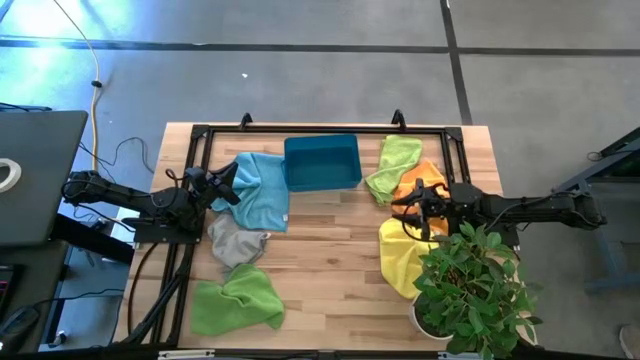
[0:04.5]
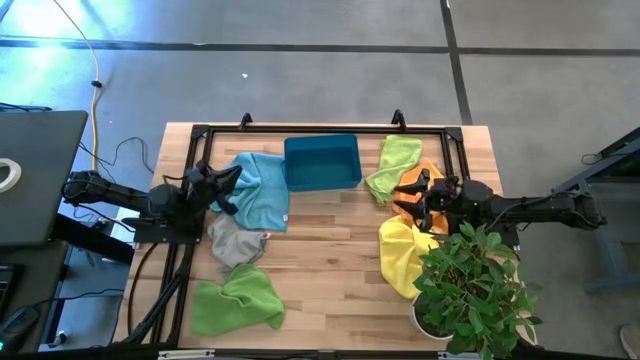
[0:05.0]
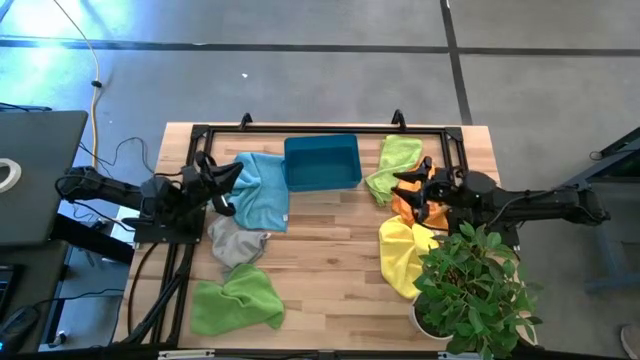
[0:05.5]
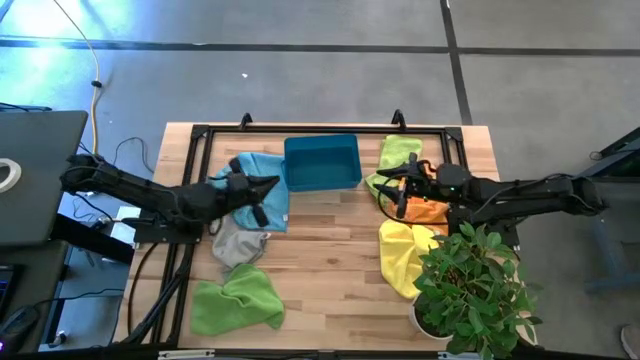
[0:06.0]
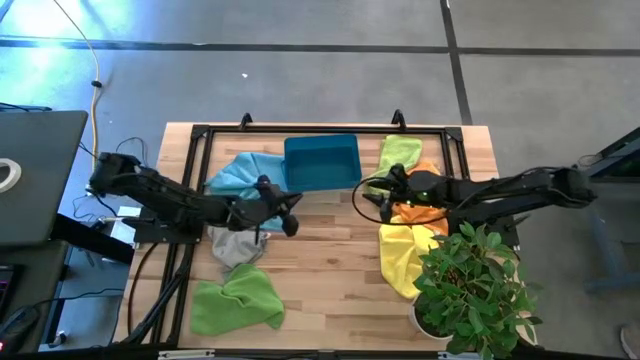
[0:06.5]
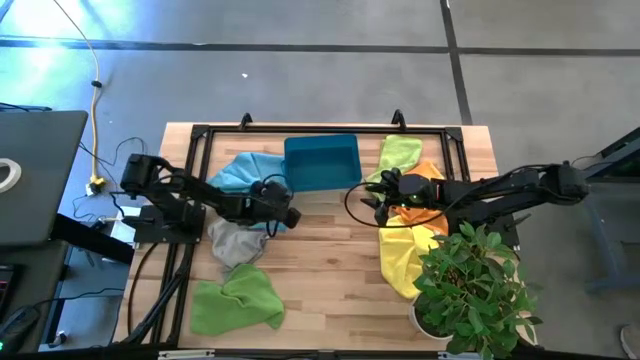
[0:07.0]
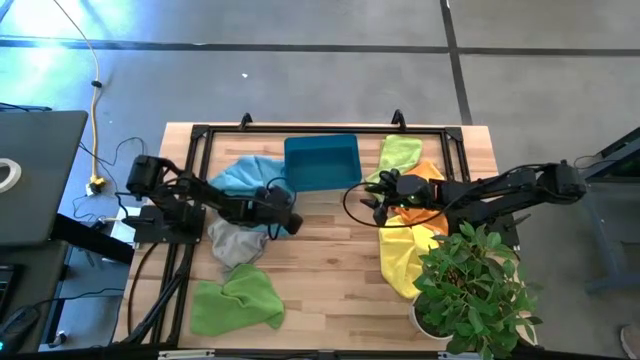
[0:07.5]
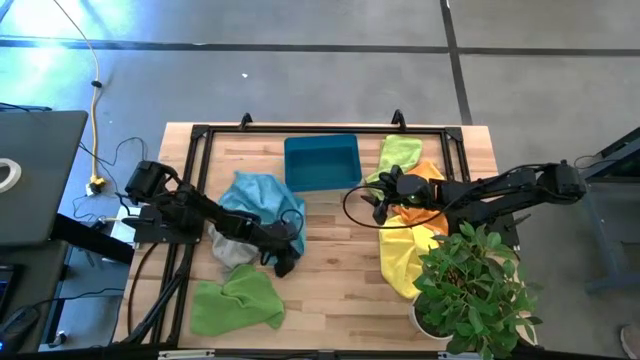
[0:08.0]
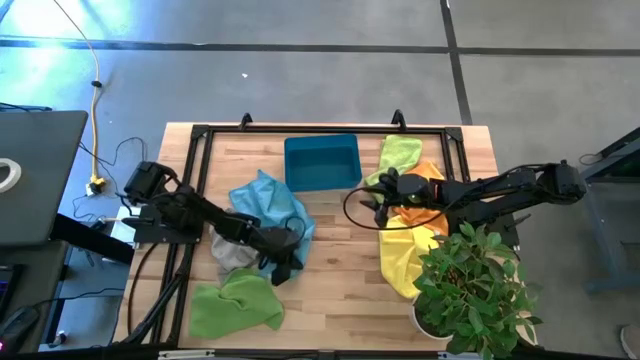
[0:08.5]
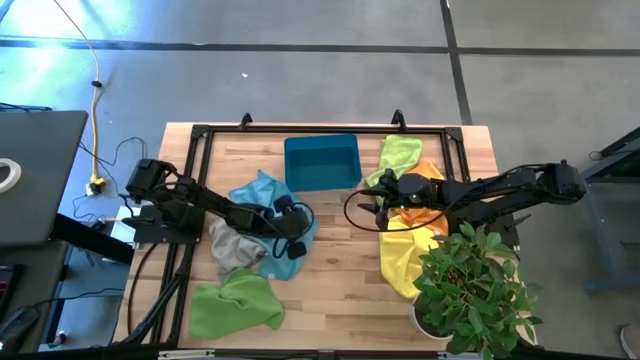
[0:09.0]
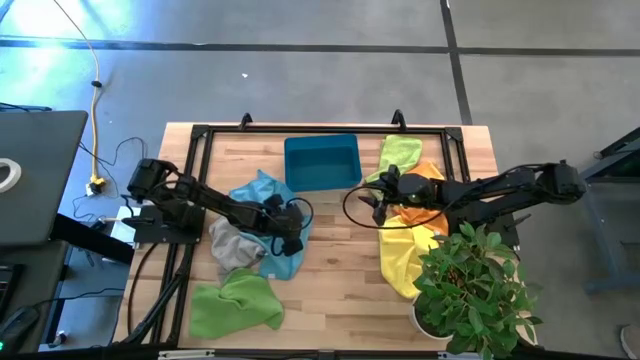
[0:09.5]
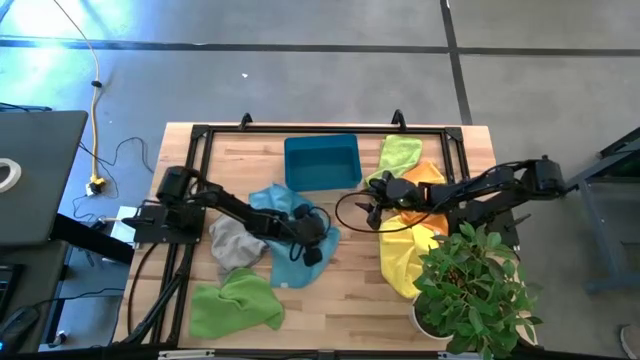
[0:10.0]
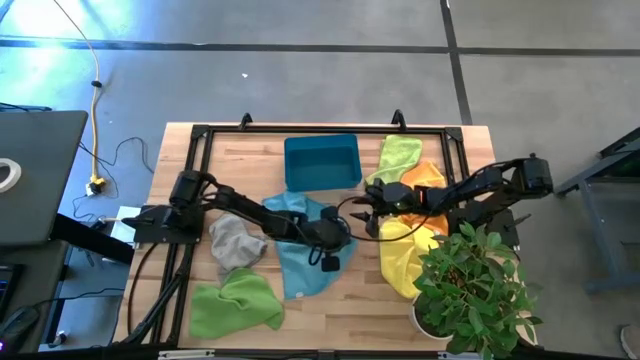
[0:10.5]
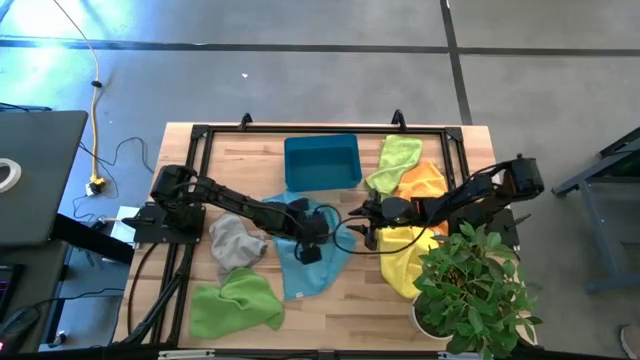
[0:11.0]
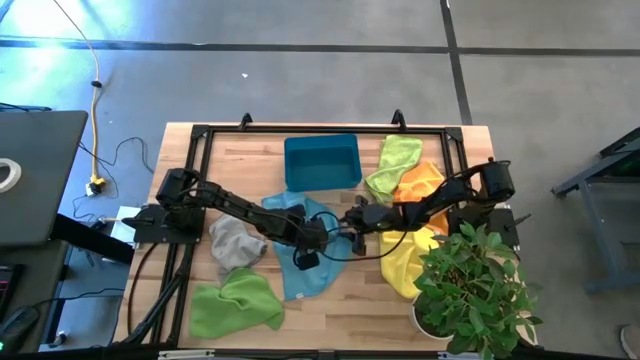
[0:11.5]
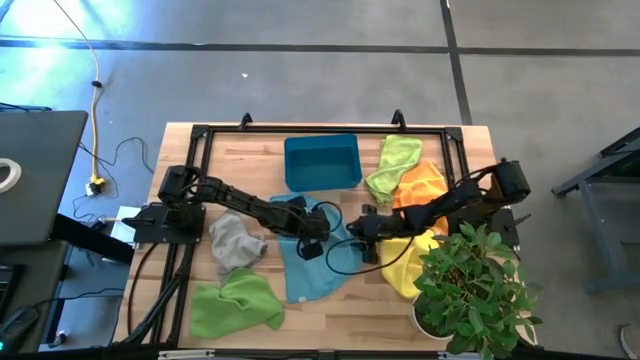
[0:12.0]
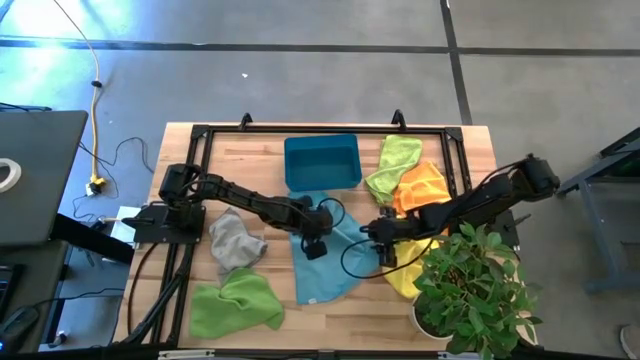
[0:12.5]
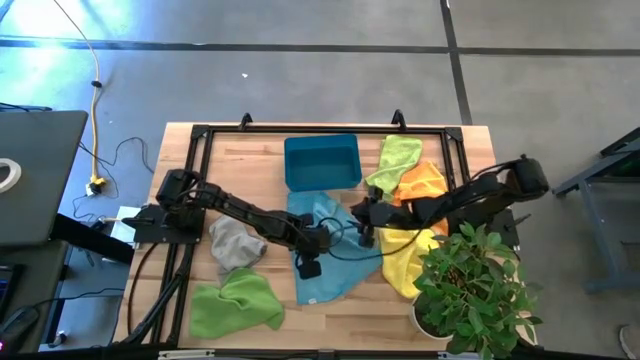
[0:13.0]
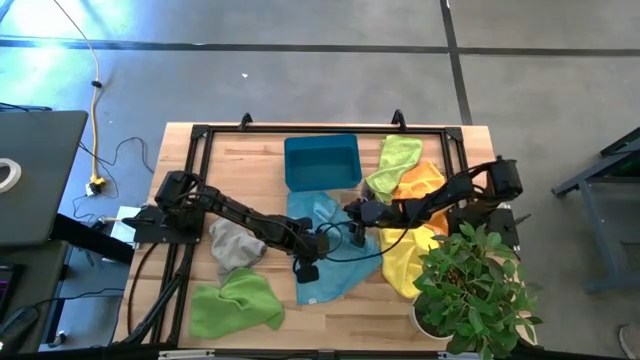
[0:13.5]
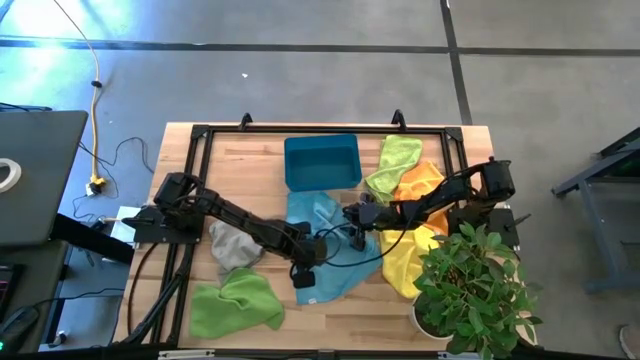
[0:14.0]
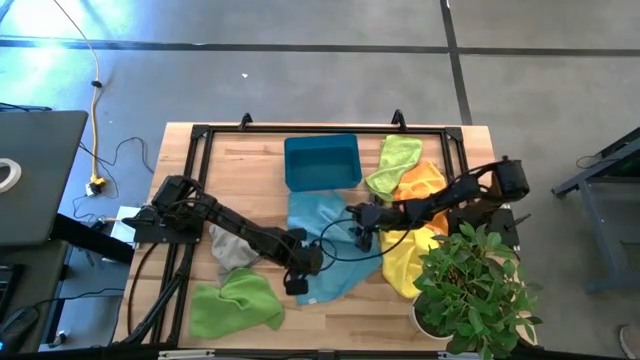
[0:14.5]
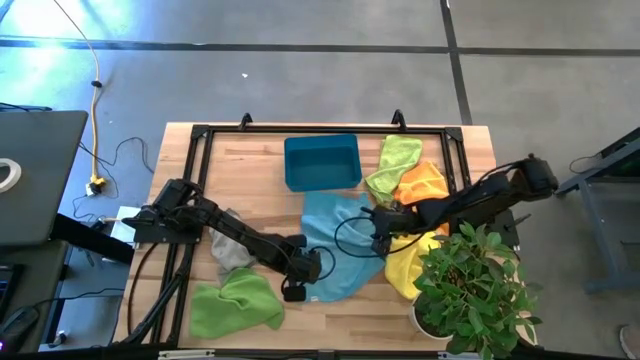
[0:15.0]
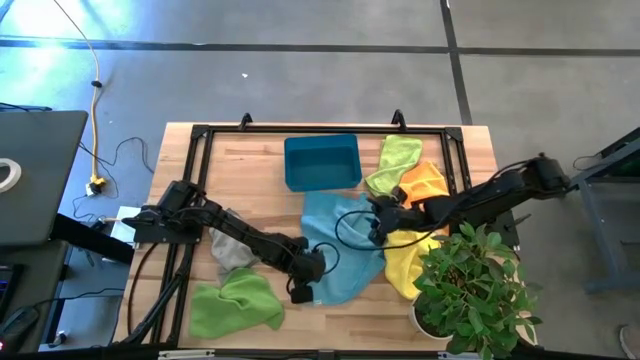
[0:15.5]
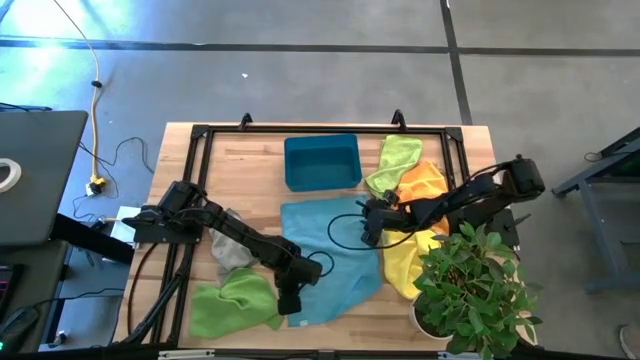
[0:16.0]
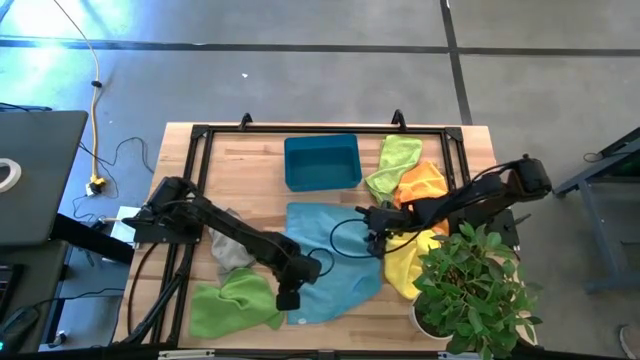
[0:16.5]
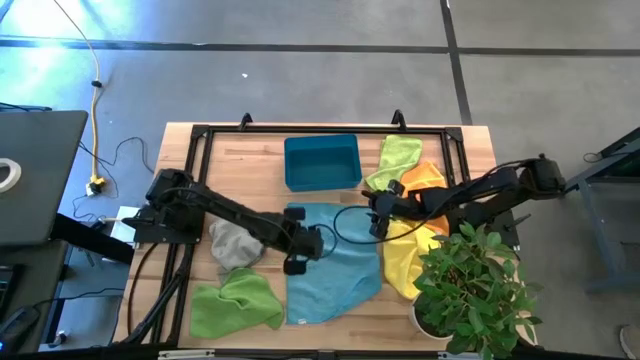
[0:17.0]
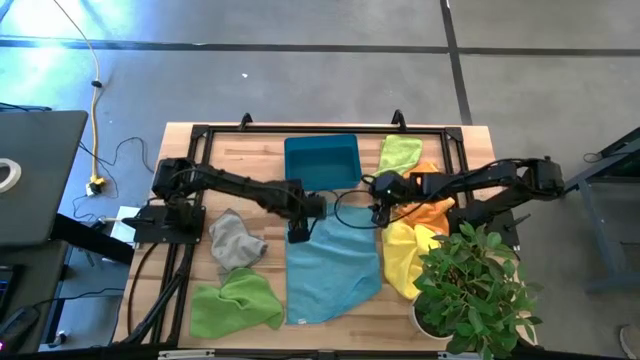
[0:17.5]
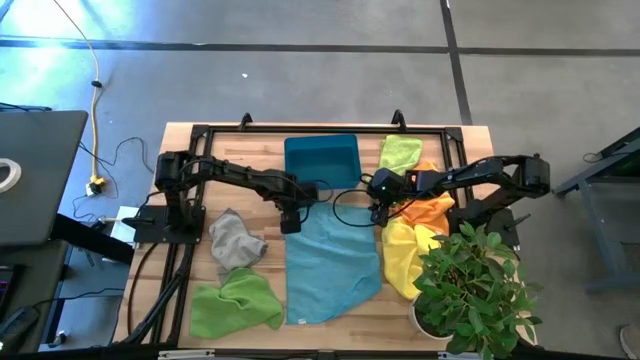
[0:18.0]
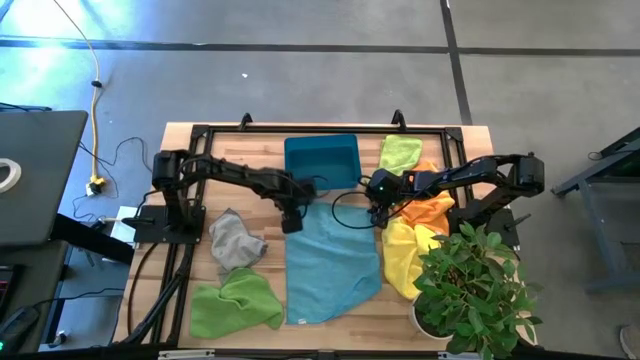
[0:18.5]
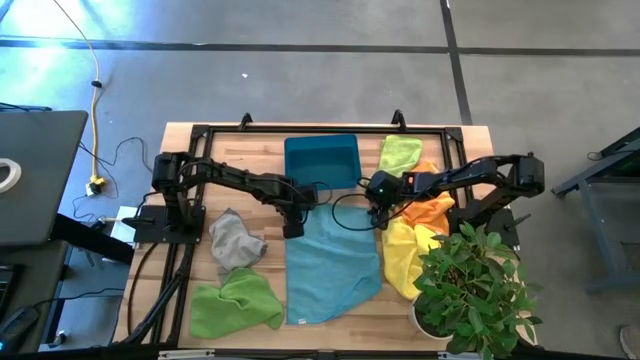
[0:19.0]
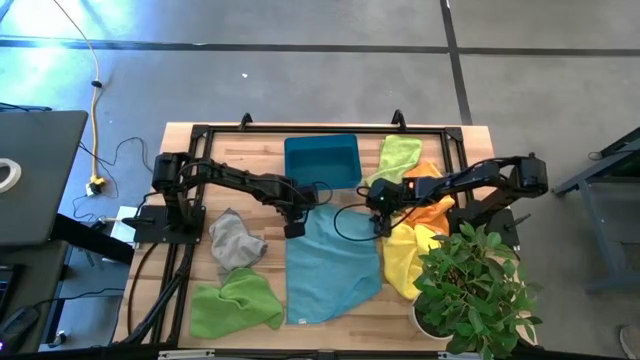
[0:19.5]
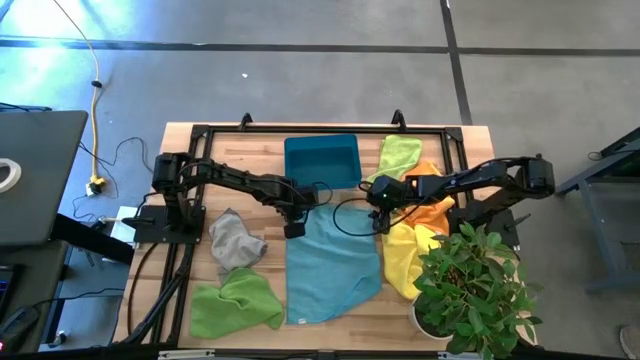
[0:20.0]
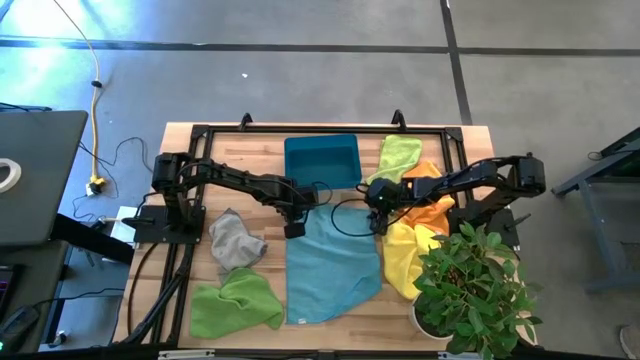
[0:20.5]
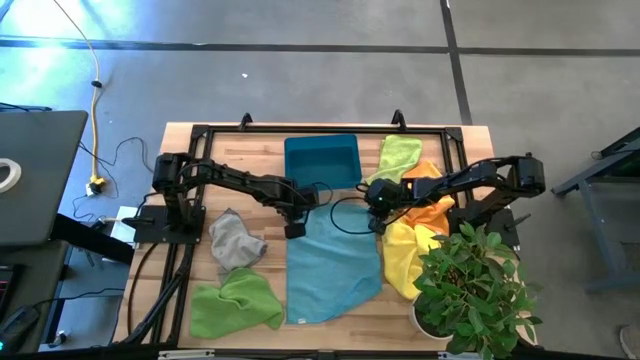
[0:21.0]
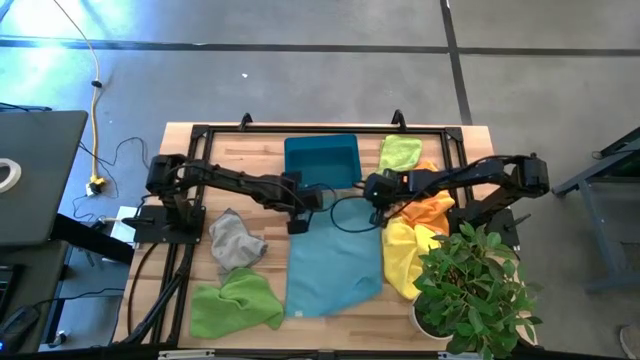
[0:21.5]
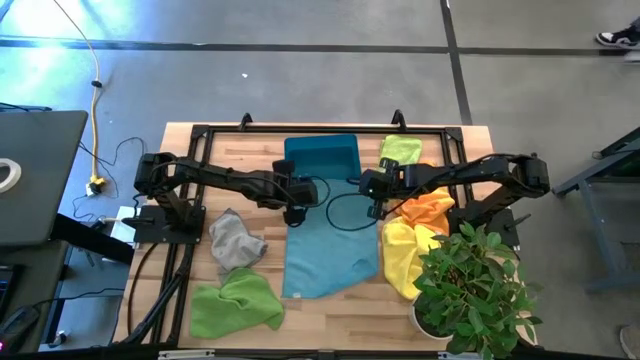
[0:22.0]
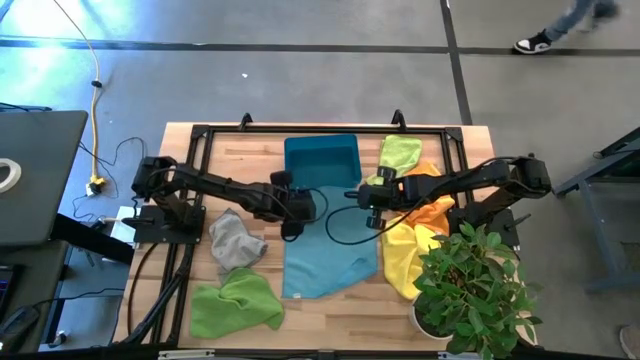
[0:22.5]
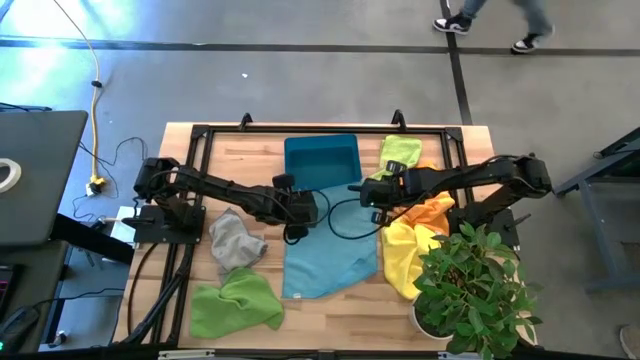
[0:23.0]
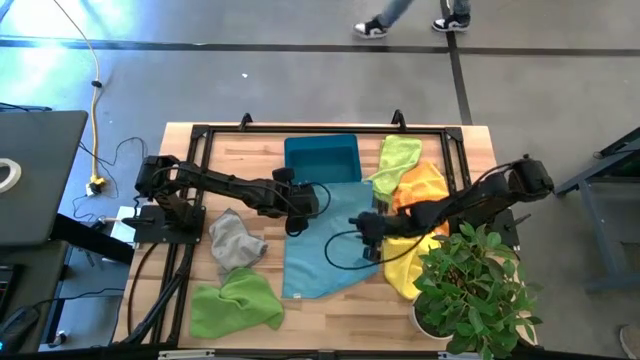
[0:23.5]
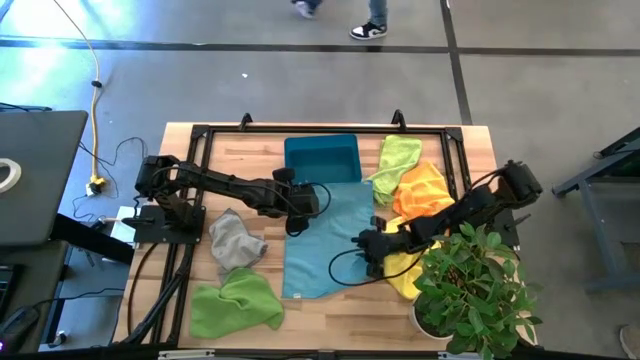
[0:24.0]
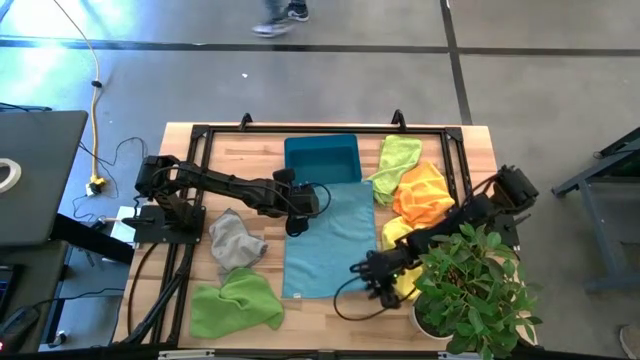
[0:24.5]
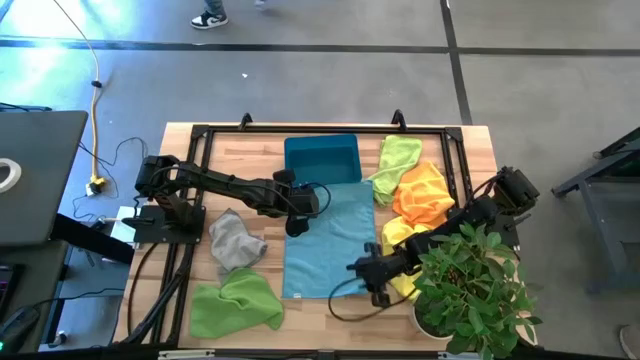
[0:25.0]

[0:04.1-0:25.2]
Task: Fold microfiber towels
Fold the blue microfiber cloth
